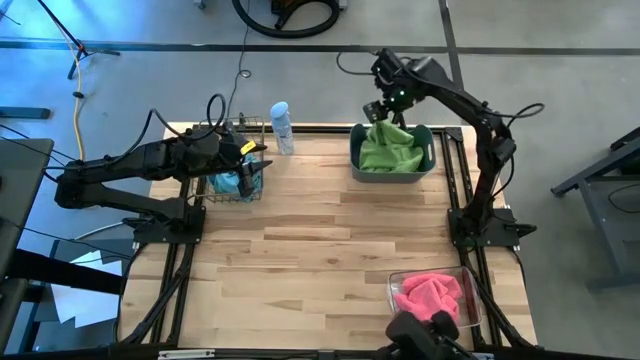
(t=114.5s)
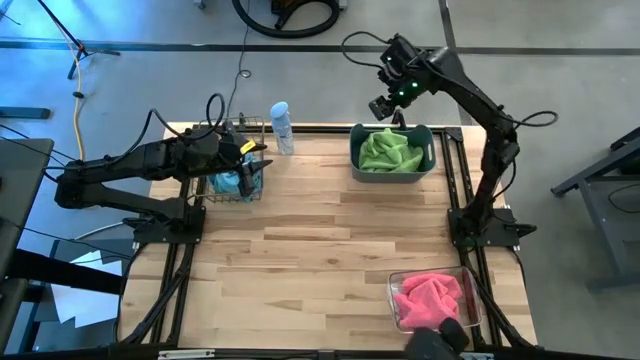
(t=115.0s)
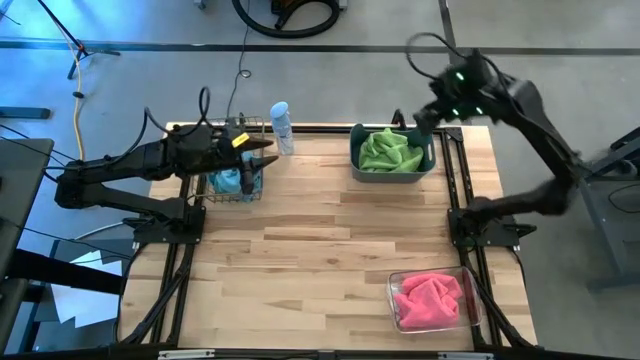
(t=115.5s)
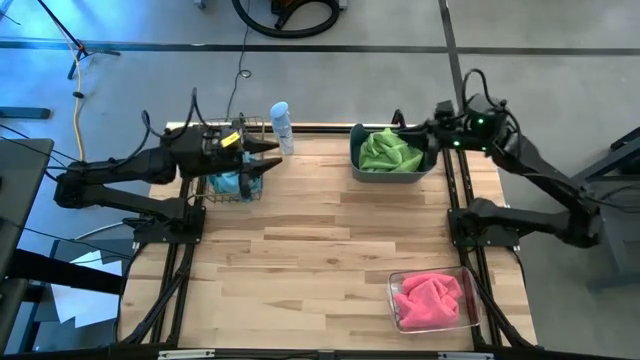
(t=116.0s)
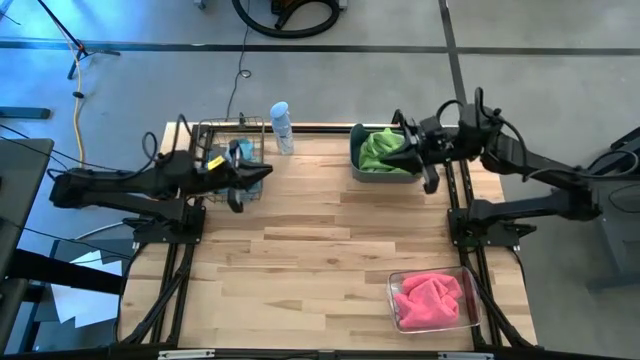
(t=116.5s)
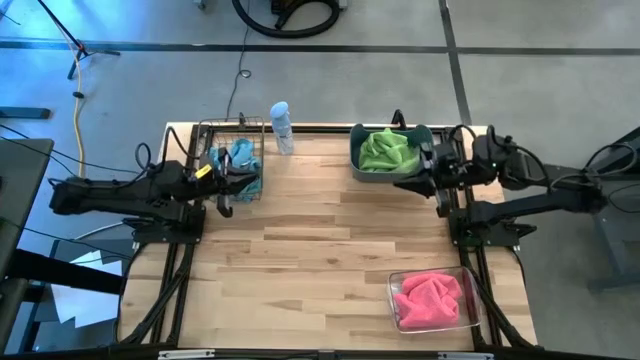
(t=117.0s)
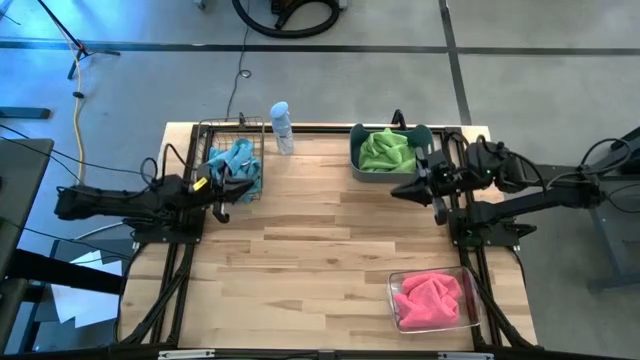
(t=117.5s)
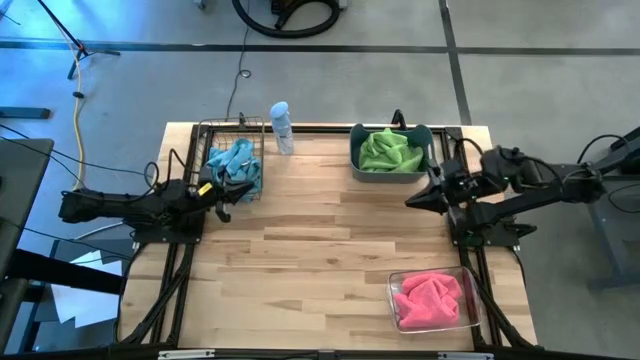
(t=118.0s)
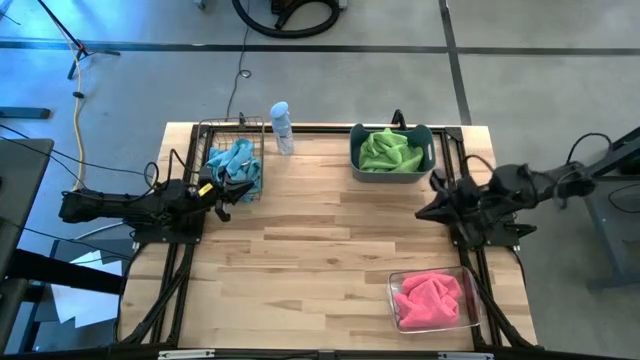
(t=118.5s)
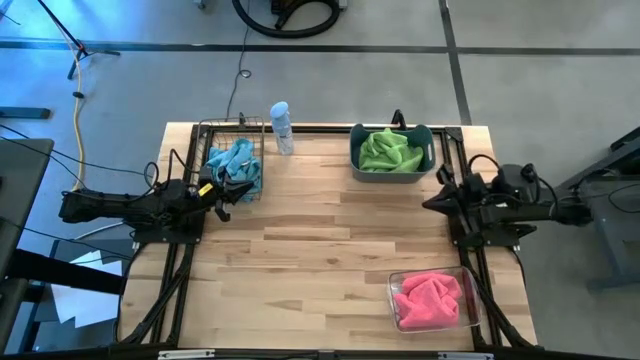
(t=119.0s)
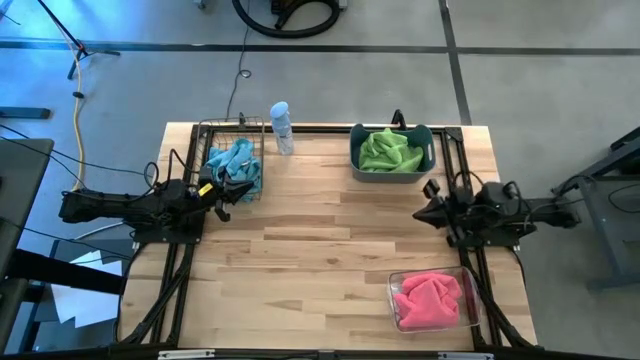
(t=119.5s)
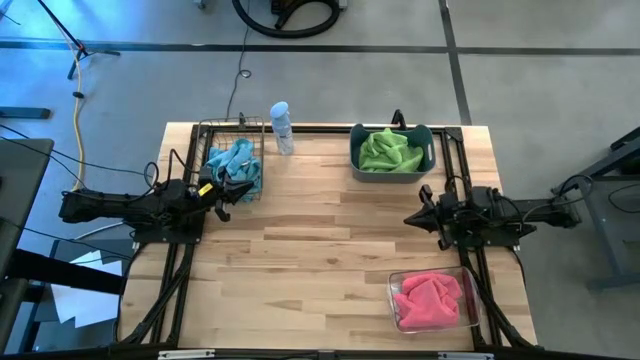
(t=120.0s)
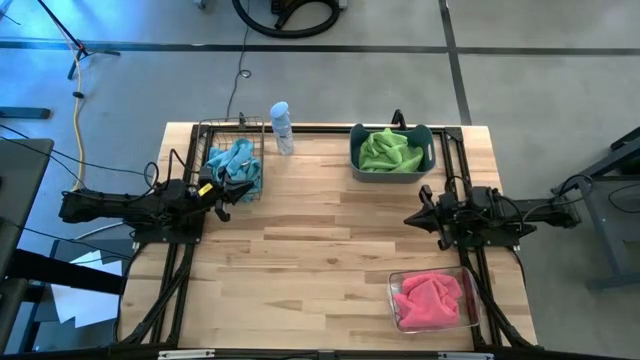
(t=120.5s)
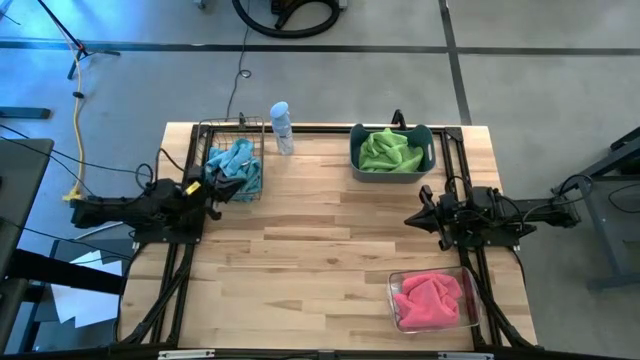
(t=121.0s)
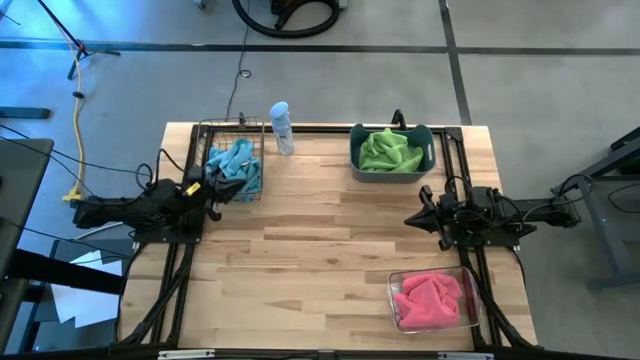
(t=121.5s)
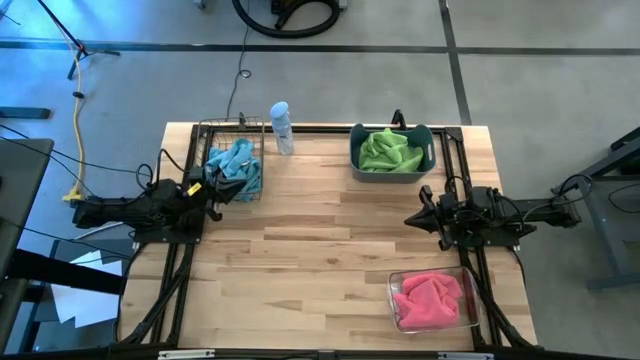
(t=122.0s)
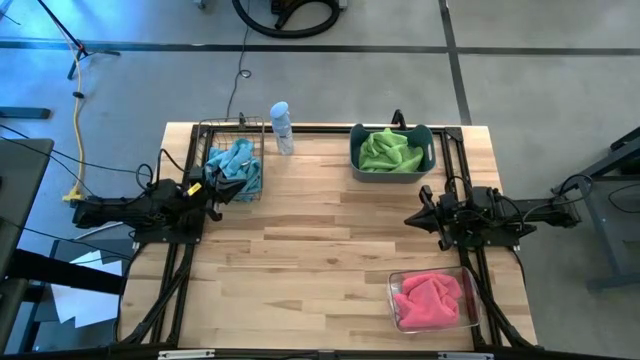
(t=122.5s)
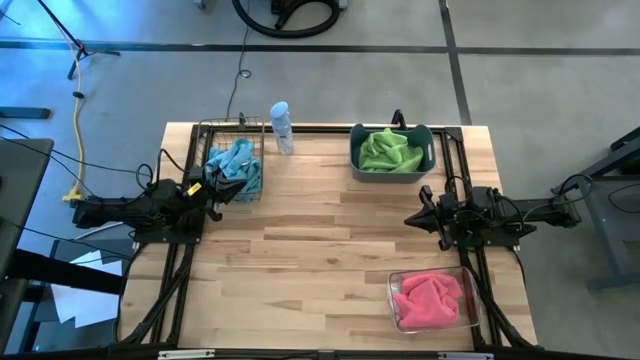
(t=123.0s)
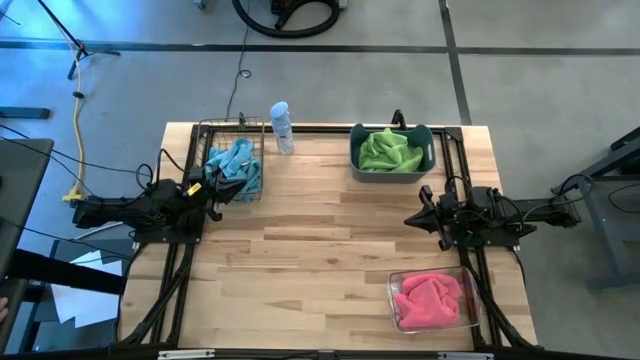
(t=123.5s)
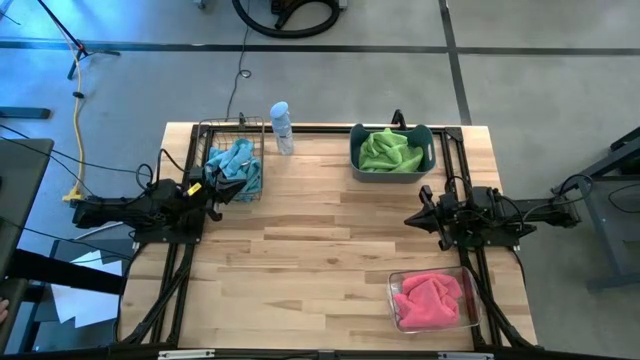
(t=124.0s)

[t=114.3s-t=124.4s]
Task: Sort microfiber towel by color & place in baskets
Return to Home Position

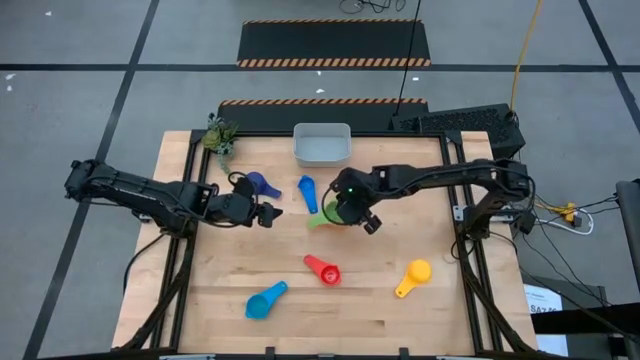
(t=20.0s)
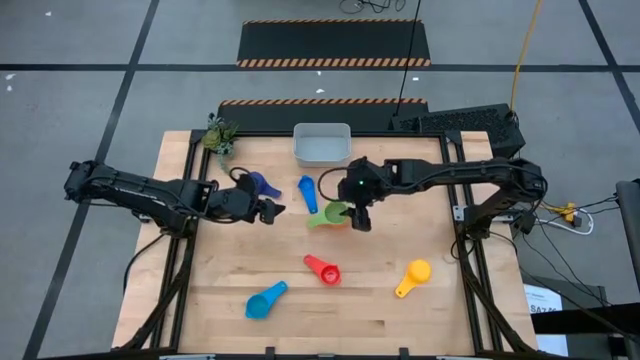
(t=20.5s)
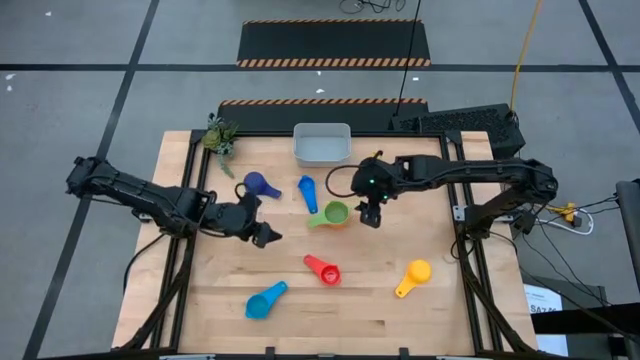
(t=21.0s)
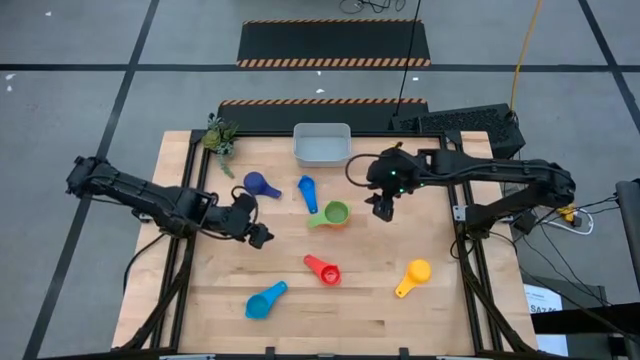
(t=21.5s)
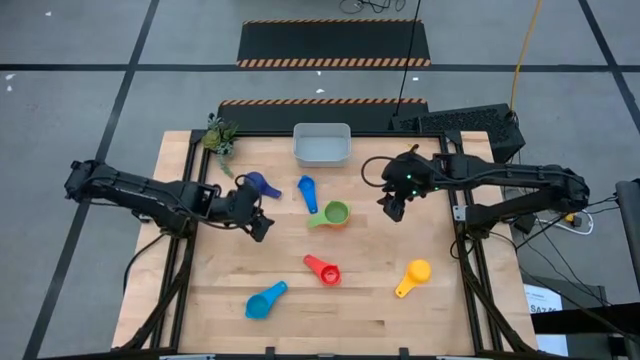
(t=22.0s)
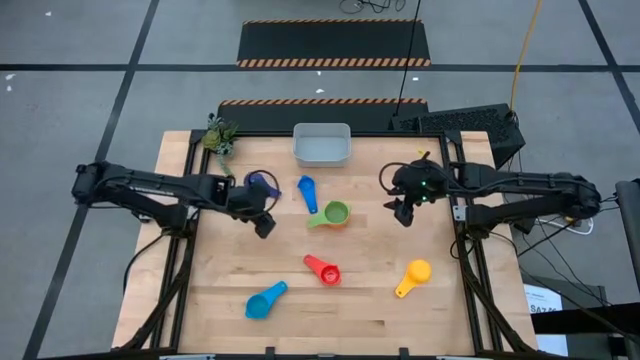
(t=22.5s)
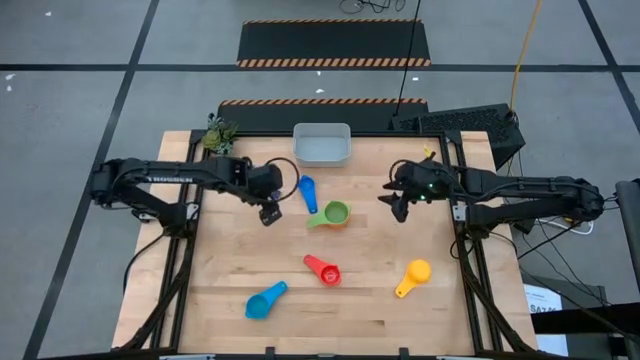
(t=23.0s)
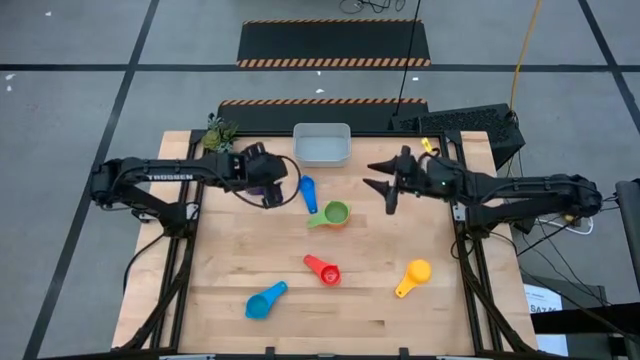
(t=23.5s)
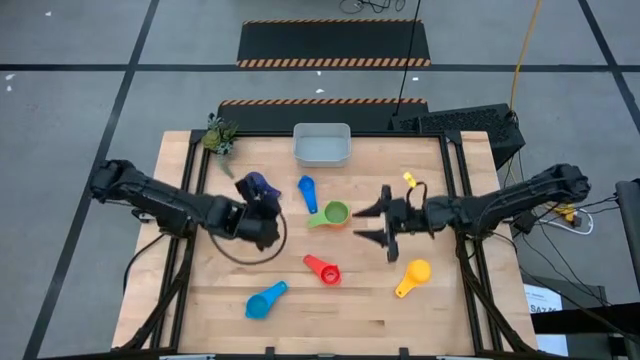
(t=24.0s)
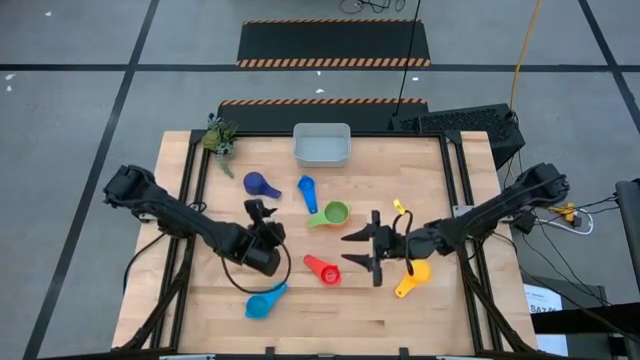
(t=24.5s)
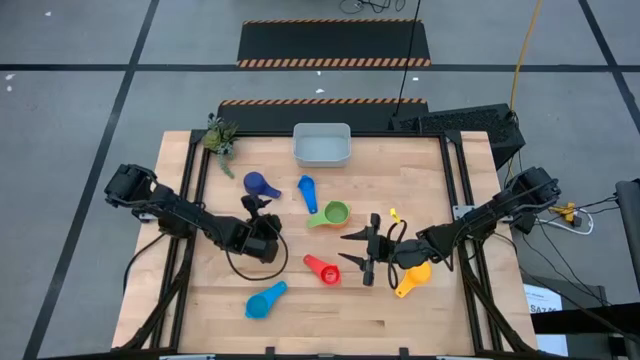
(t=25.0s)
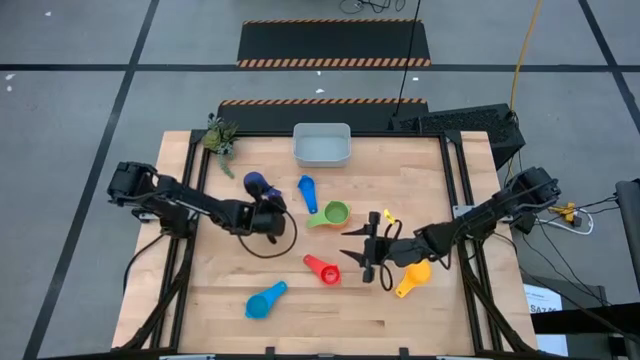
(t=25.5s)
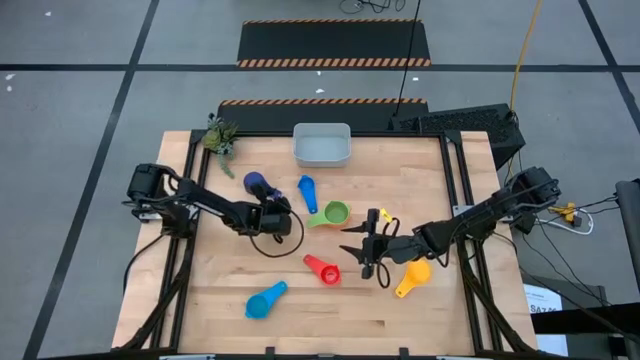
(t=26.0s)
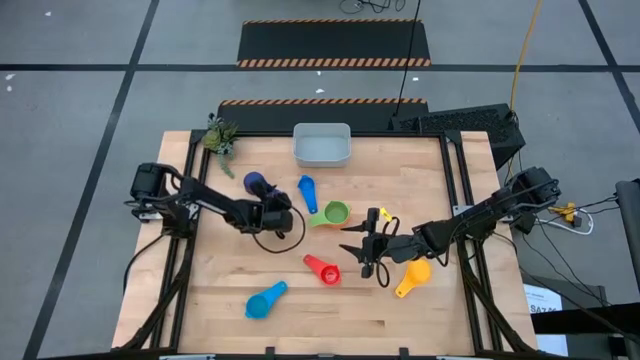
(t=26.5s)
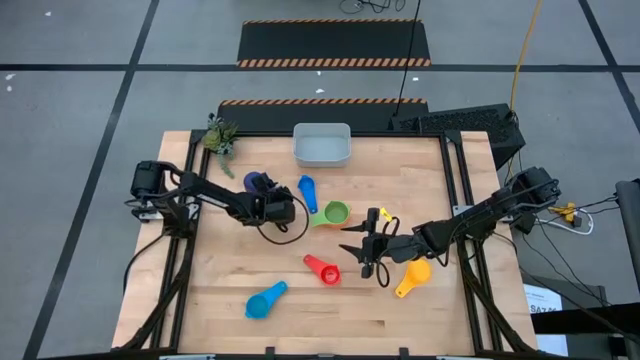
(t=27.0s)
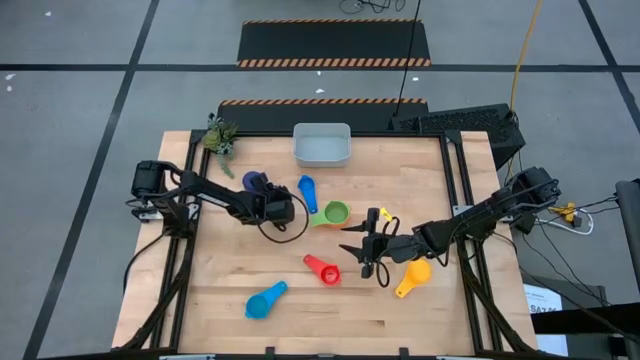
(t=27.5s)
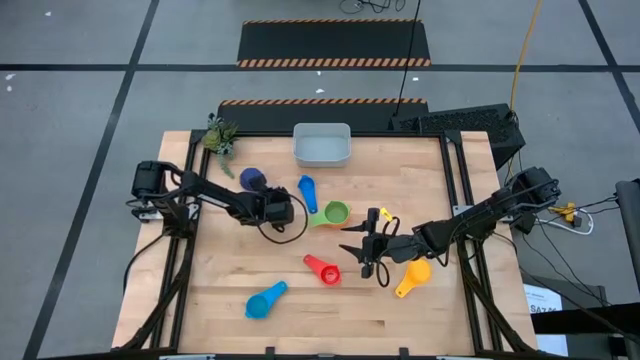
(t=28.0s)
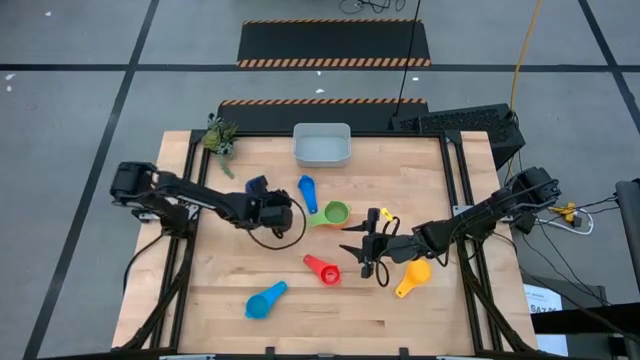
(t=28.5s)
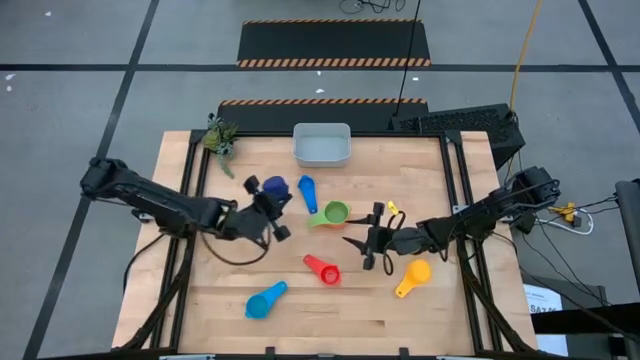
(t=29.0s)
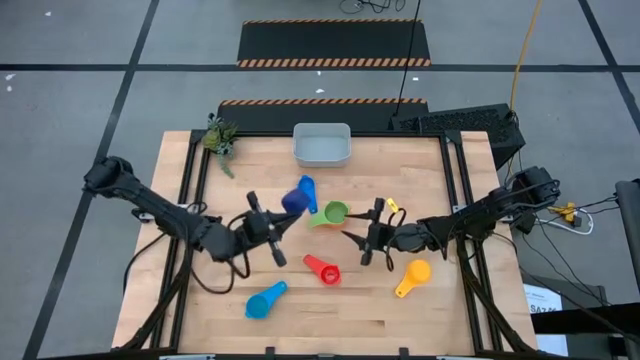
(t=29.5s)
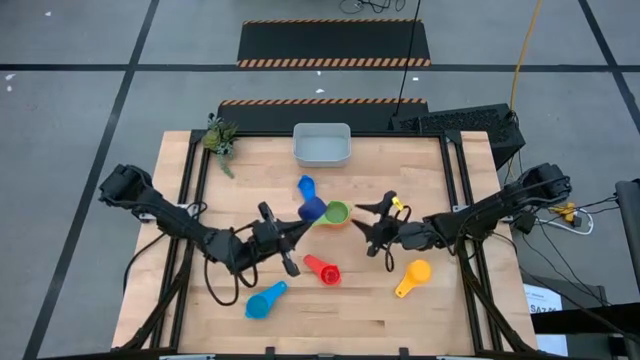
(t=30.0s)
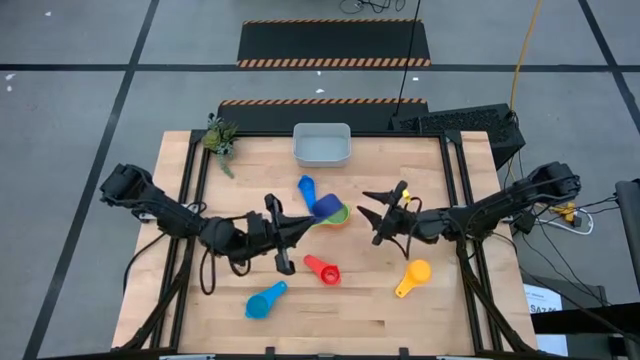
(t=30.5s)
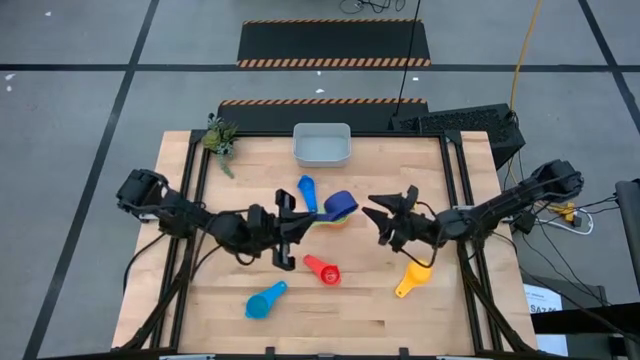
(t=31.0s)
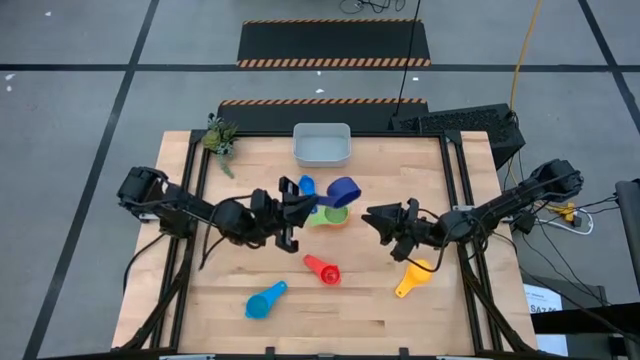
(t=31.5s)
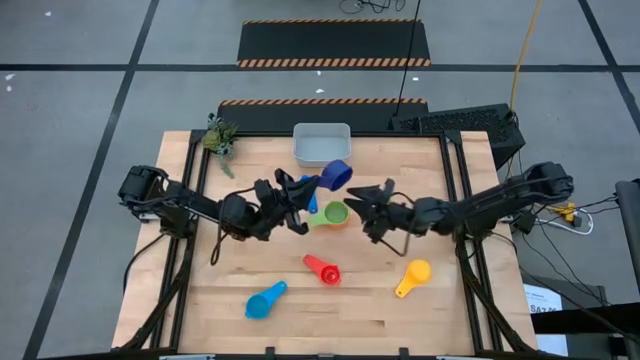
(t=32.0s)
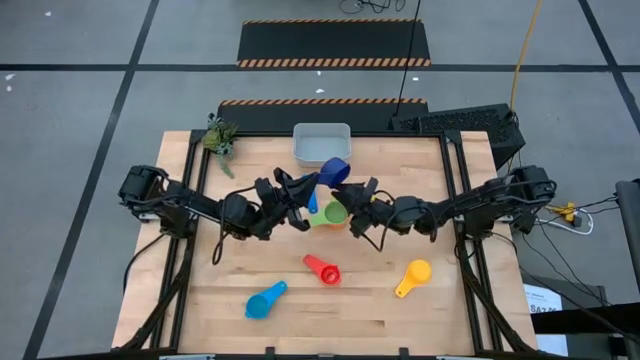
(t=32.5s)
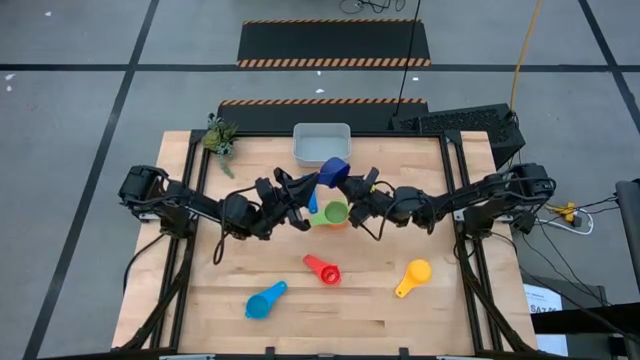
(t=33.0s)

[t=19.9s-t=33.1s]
Task: Nest measuring cups in basket
Stack the purple measuring cup into the green measuring cup
